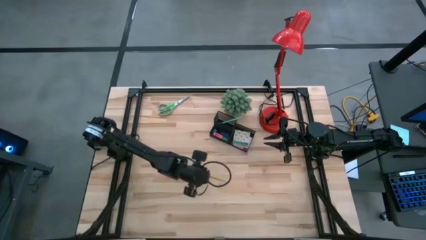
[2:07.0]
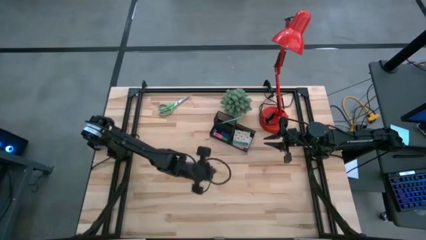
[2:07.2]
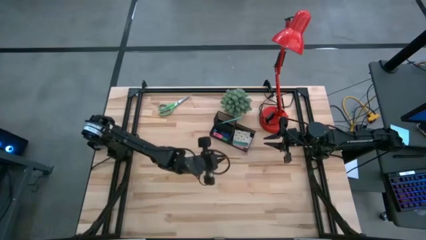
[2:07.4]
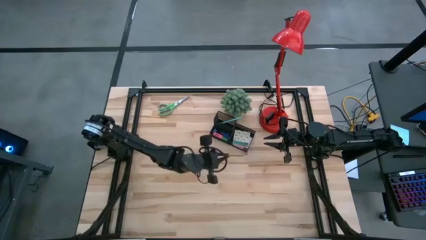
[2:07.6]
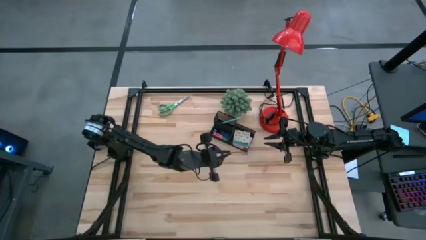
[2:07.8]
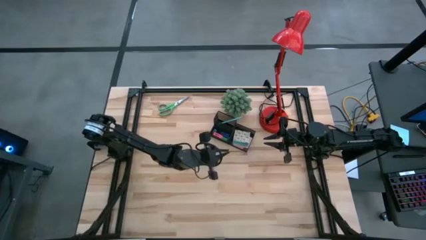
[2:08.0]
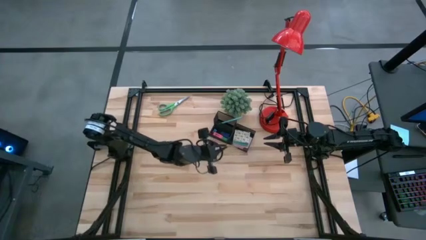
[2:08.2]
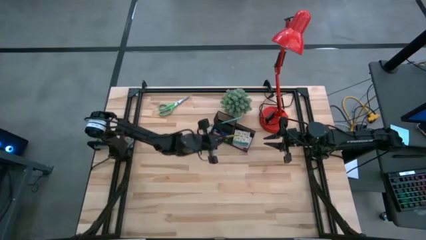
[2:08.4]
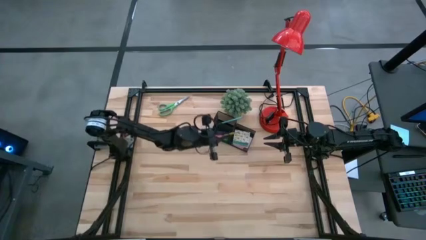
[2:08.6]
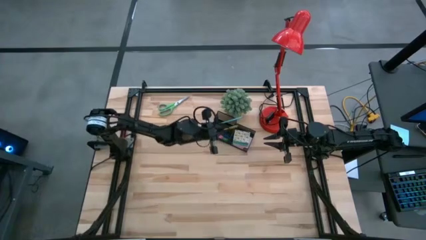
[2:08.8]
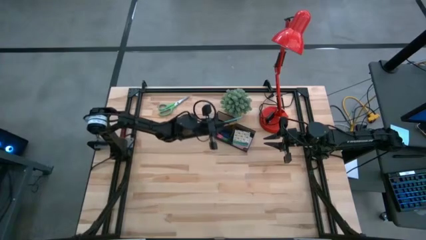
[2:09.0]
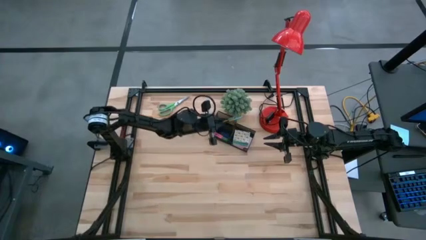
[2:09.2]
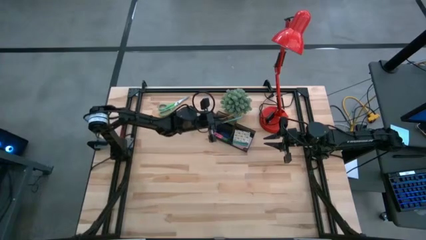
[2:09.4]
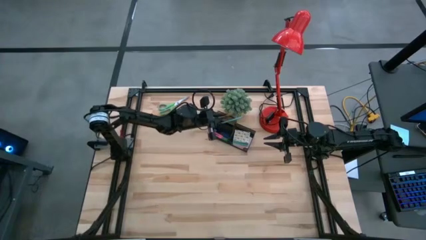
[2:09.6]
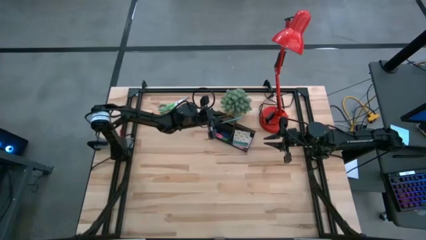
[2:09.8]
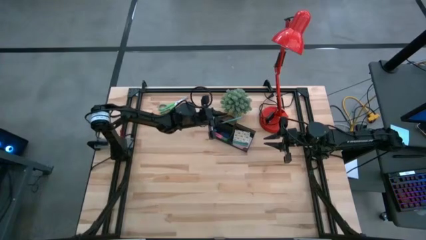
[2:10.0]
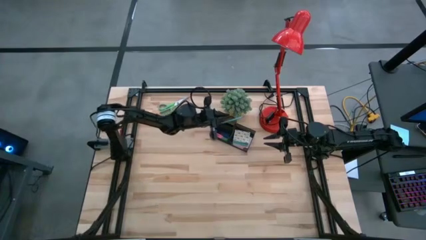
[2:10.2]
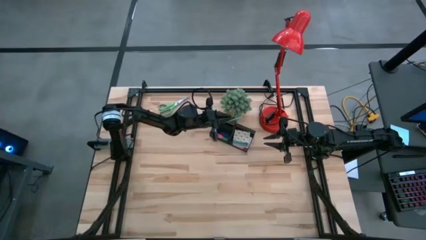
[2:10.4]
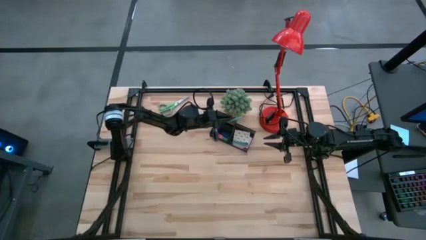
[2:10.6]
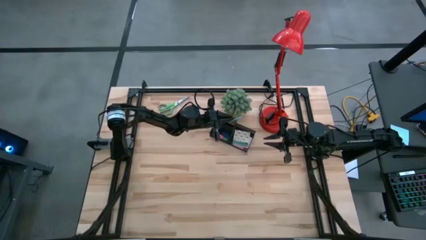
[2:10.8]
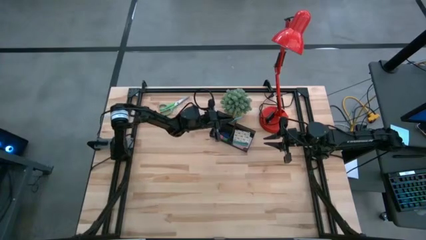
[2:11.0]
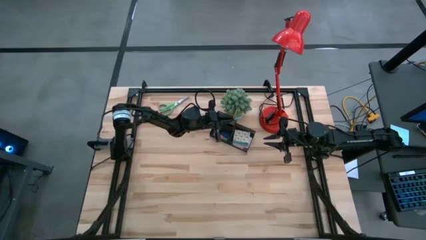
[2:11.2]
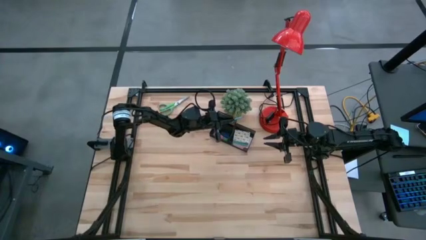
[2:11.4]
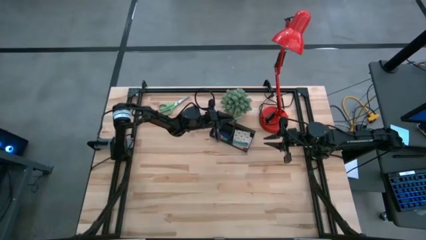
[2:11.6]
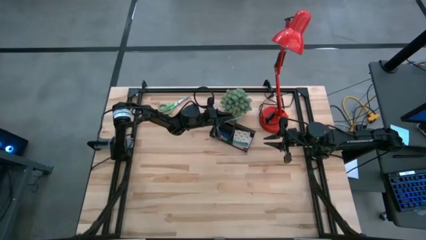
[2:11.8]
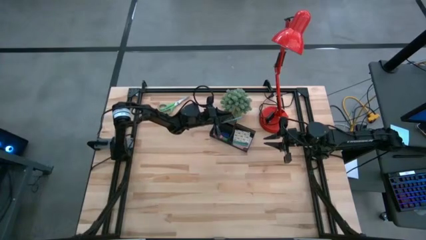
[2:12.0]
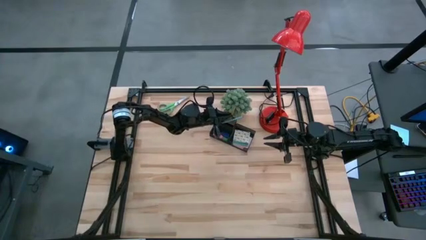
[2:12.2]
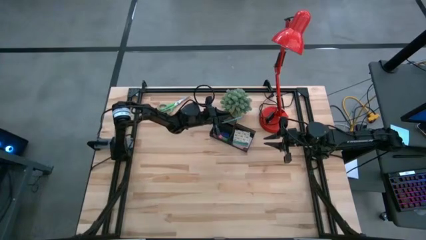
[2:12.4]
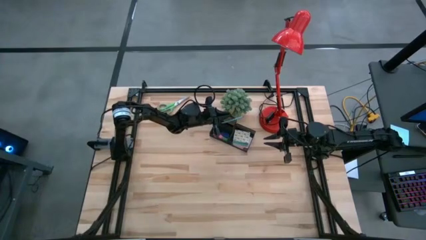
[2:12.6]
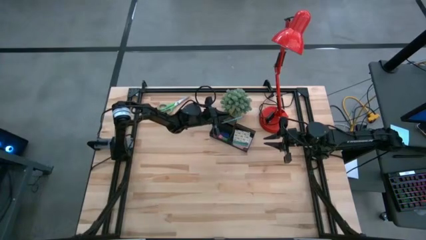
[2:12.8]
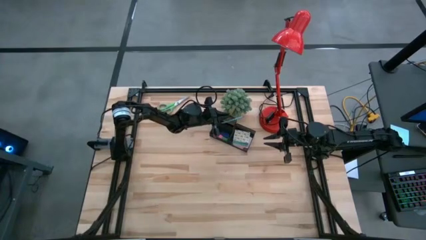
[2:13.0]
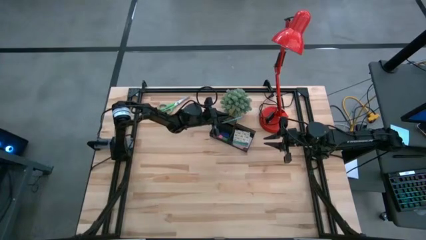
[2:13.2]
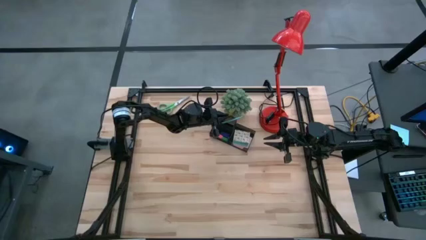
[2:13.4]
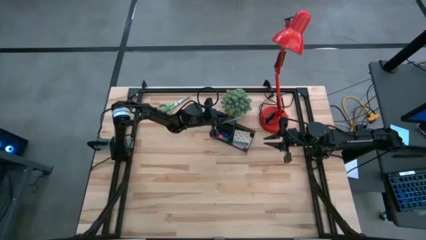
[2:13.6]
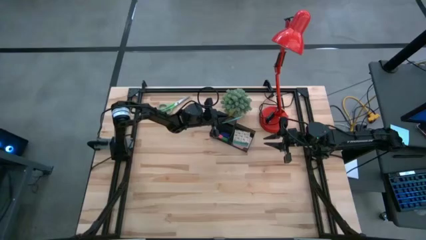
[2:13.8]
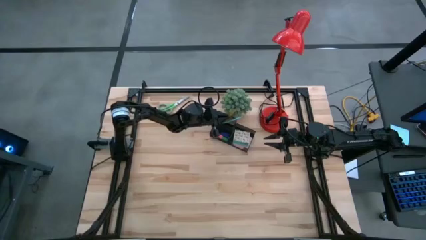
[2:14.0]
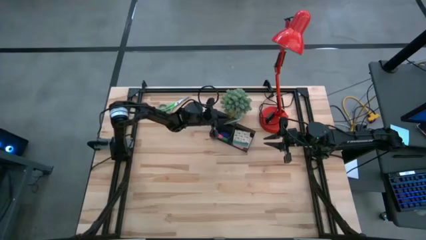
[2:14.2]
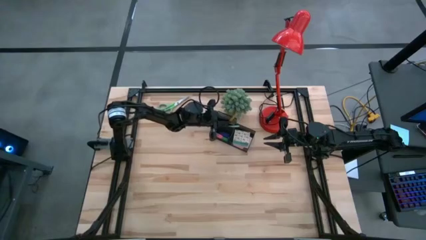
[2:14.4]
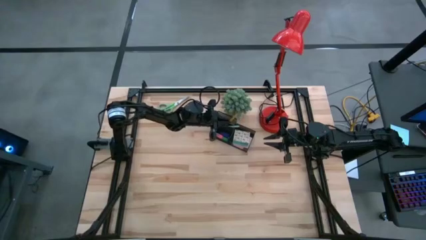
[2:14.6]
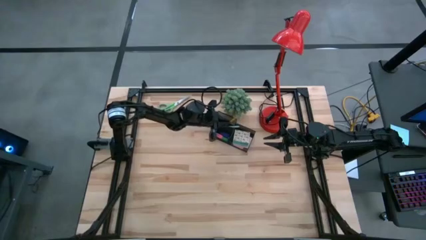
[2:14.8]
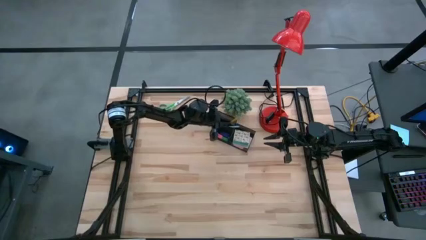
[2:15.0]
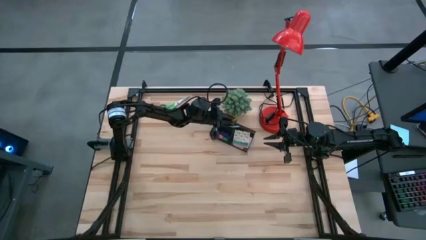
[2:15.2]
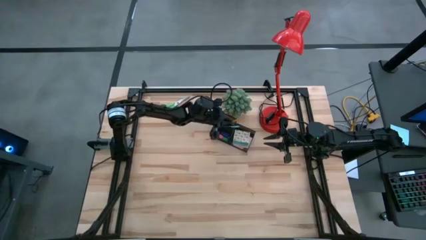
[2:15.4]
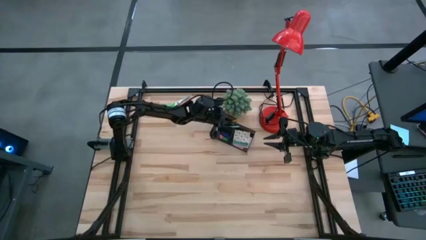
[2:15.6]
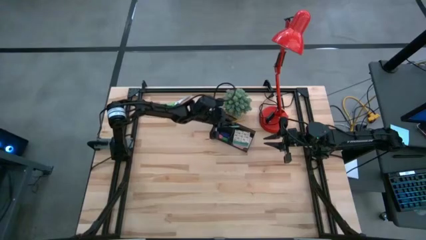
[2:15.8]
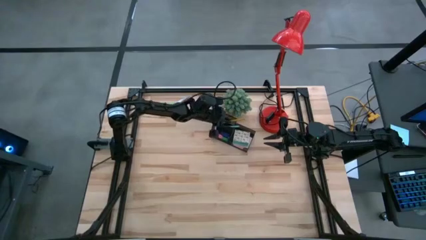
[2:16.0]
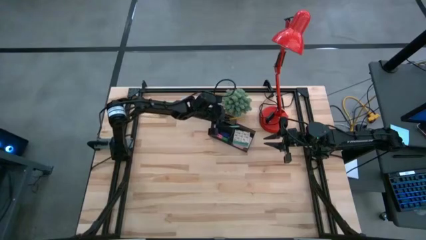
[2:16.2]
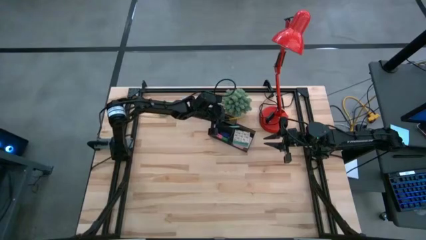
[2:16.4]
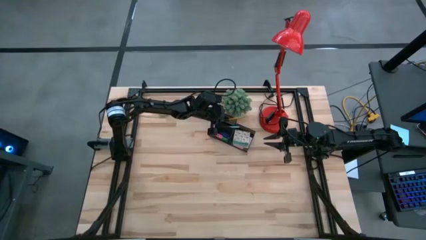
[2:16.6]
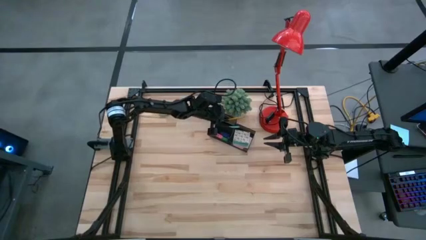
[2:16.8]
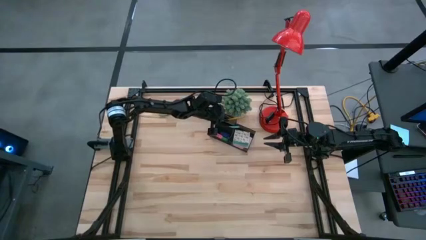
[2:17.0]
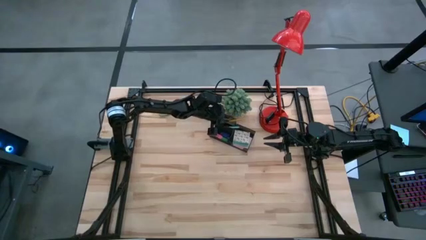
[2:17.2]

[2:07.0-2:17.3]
Task: Pick and place office supplies into organizer
Put the yellow pencil into the black desk organizer

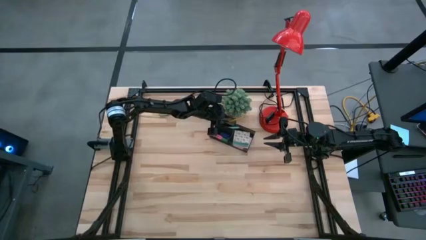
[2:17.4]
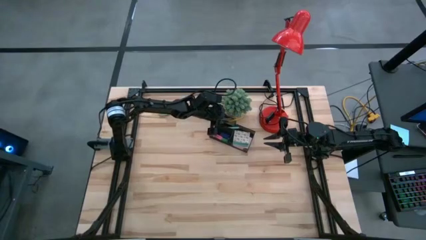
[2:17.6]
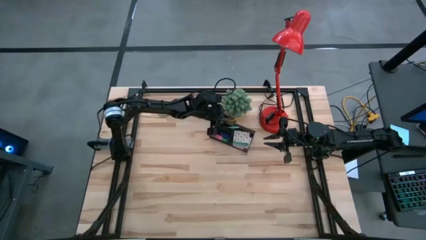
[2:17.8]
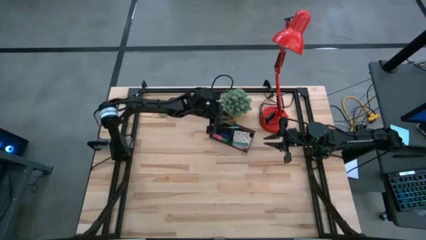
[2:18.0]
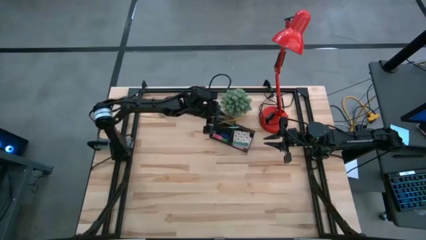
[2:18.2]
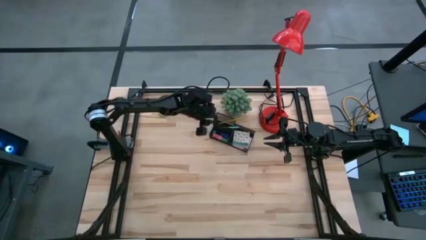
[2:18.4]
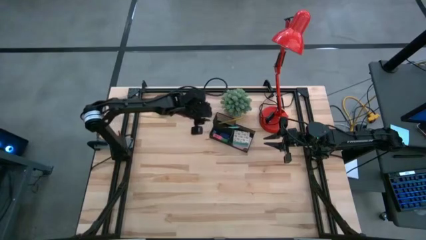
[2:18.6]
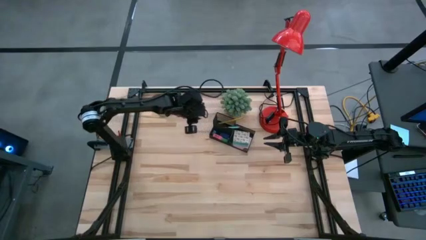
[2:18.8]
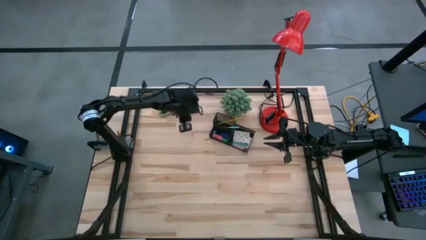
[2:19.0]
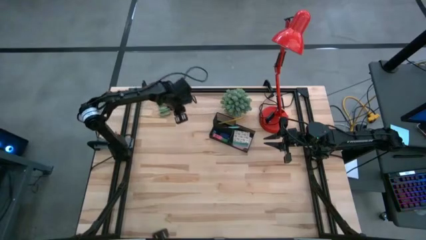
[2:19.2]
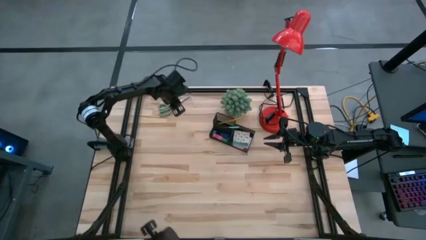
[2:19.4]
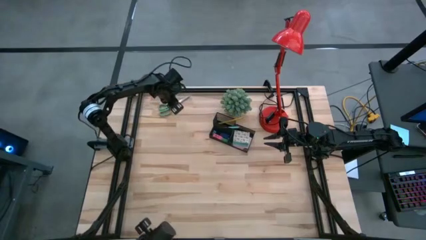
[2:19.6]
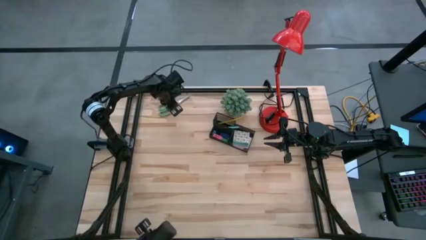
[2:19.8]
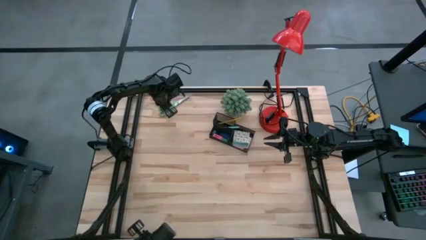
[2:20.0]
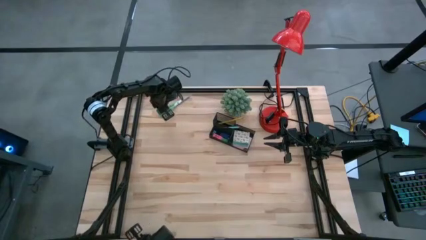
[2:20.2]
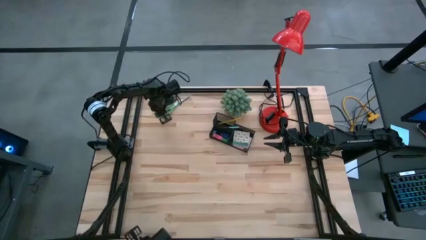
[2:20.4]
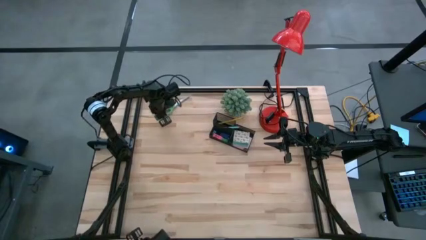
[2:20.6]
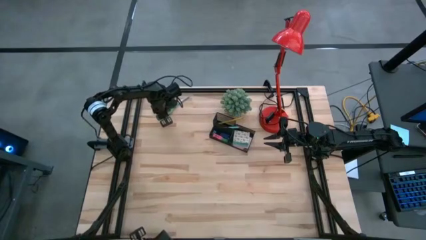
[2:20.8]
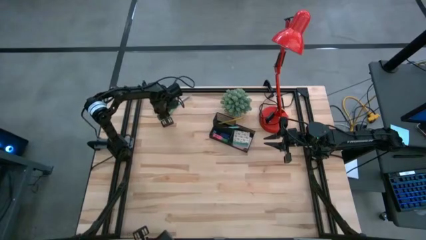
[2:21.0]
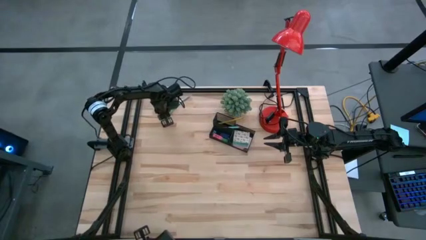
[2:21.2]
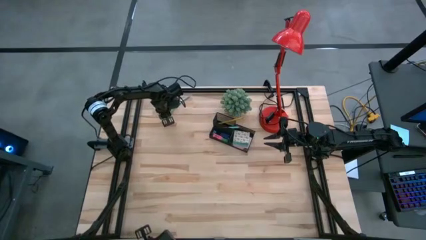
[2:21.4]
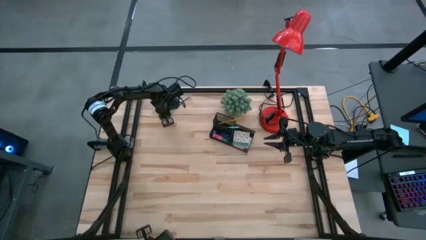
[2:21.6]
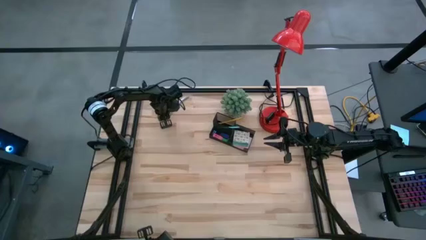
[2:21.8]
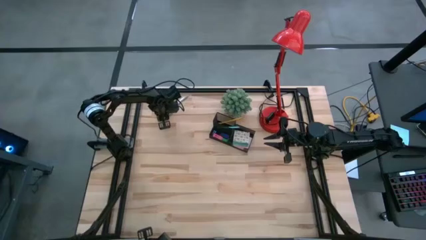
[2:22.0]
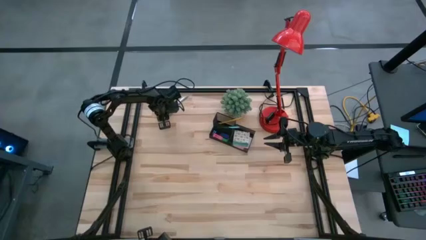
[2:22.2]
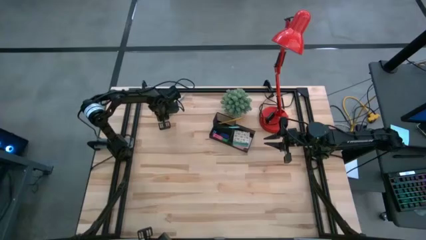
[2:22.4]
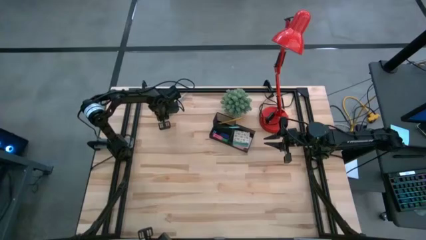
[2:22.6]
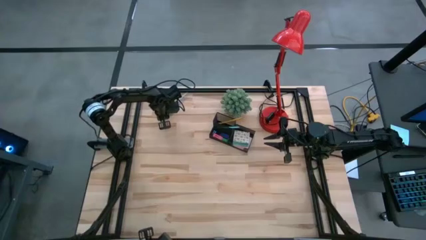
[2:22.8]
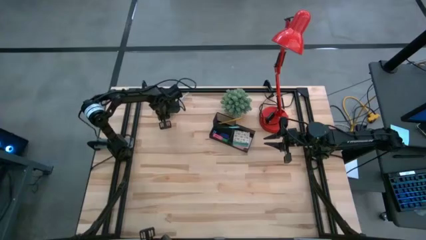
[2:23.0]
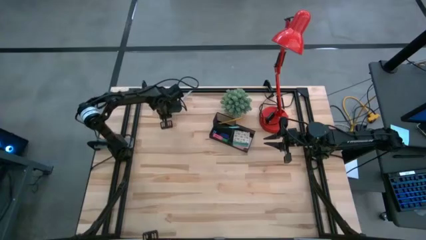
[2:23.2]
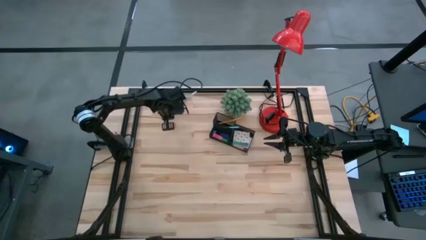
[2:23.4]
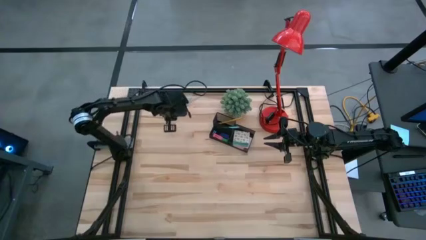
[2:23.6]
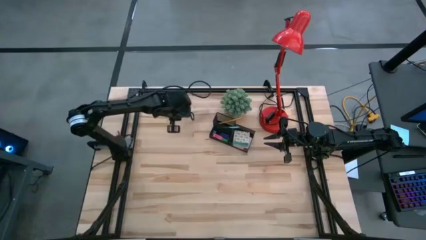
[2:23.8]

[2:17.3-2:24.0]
Put the green scissors into the black desk organizer
